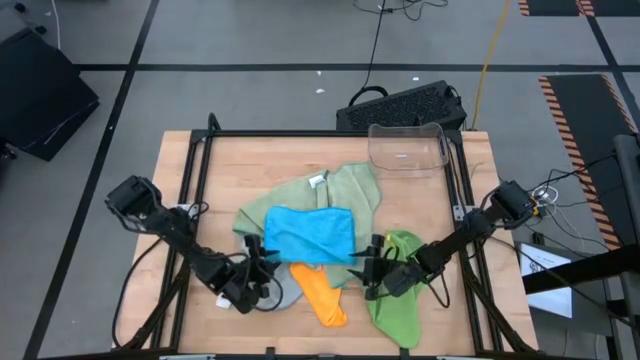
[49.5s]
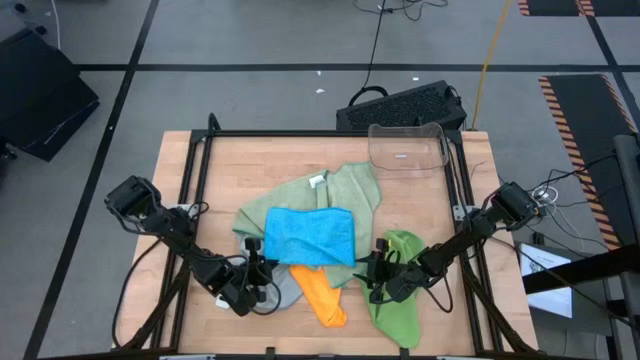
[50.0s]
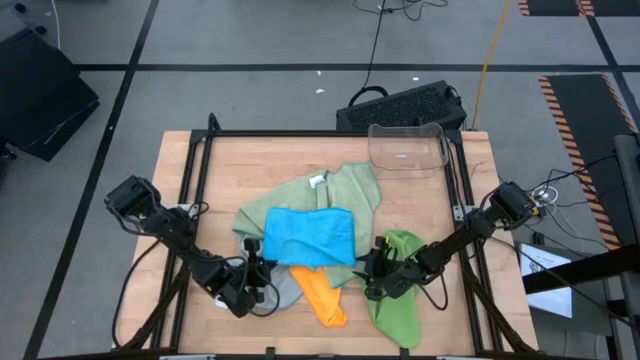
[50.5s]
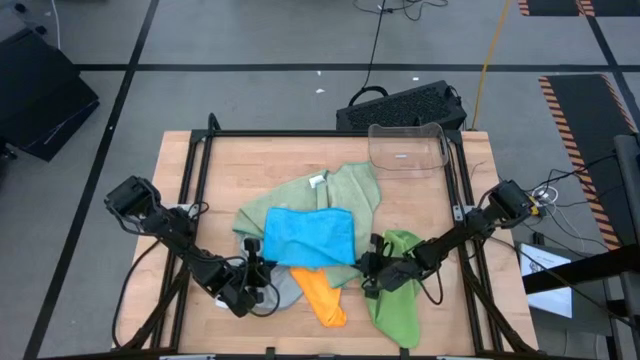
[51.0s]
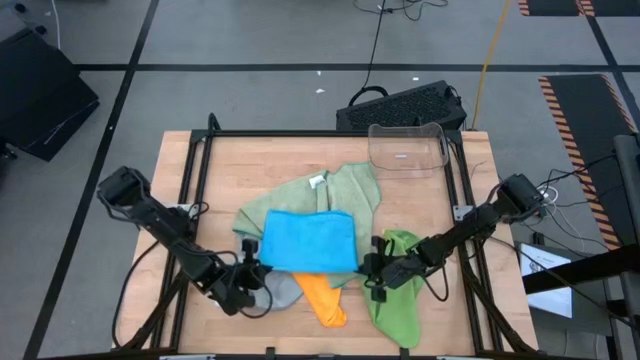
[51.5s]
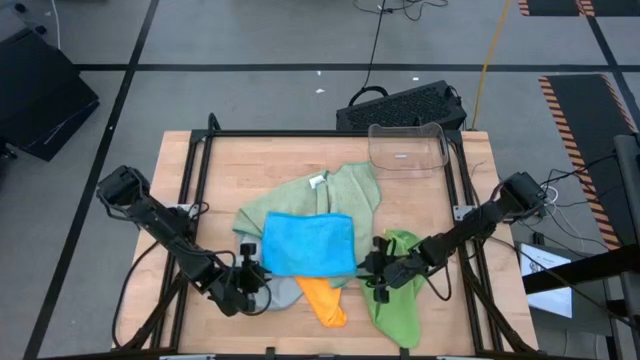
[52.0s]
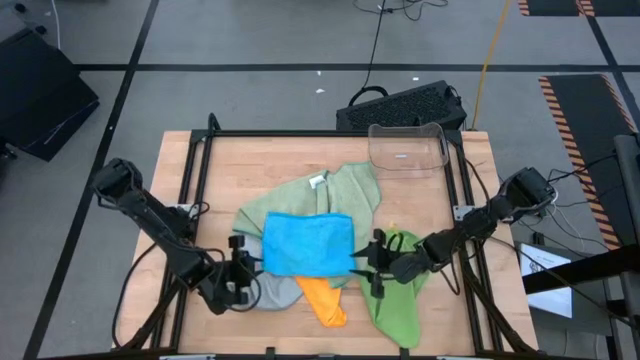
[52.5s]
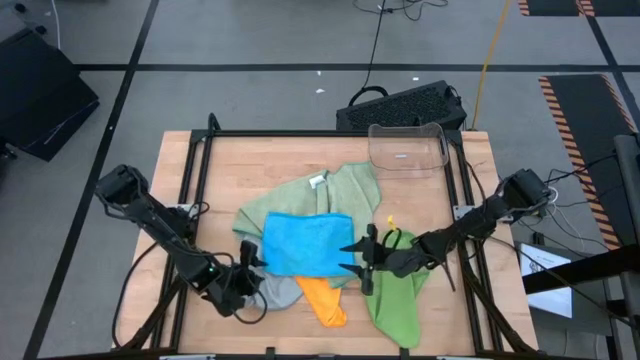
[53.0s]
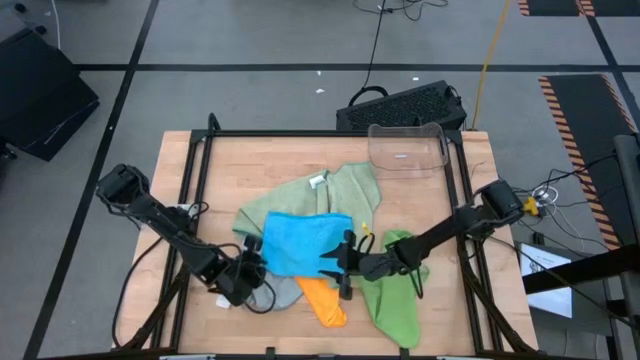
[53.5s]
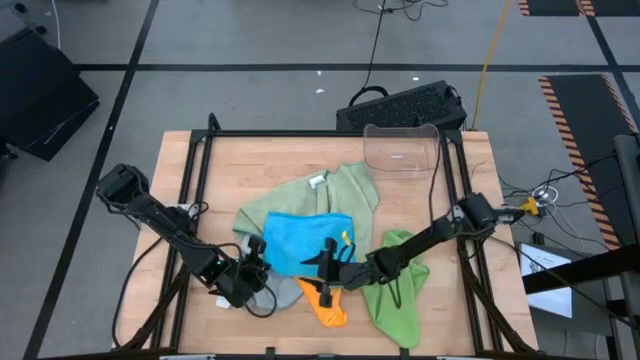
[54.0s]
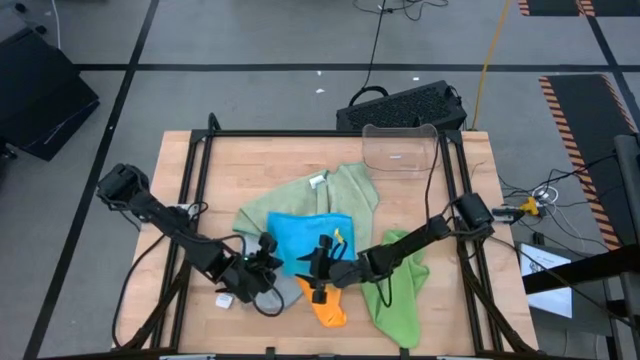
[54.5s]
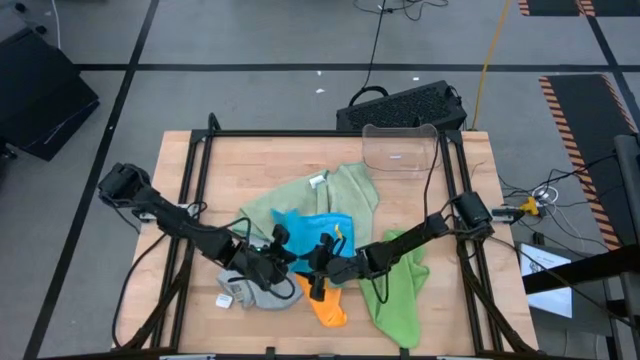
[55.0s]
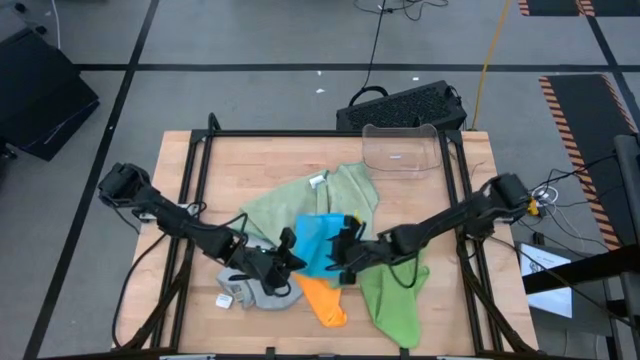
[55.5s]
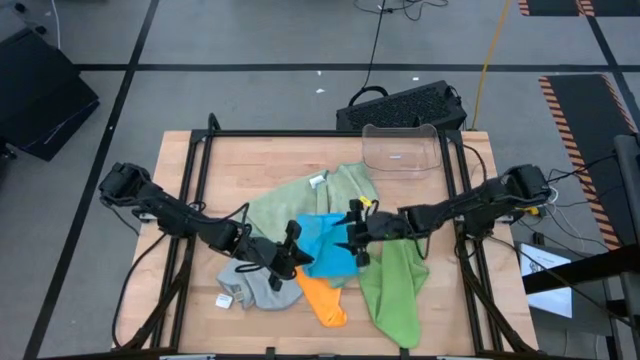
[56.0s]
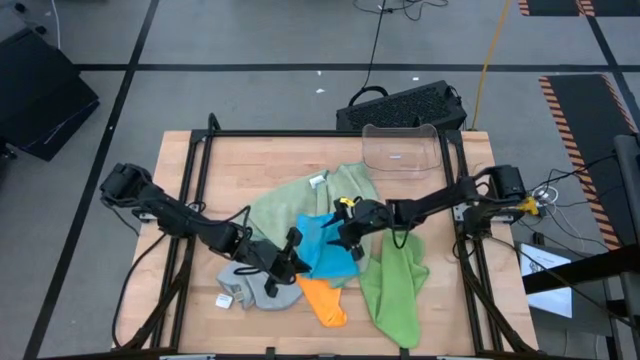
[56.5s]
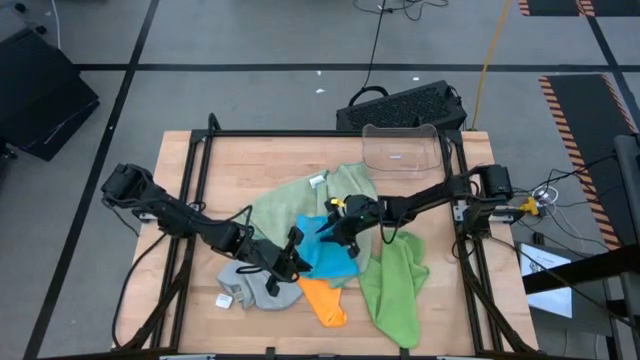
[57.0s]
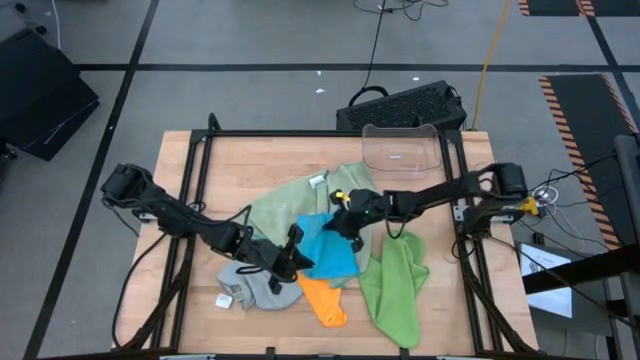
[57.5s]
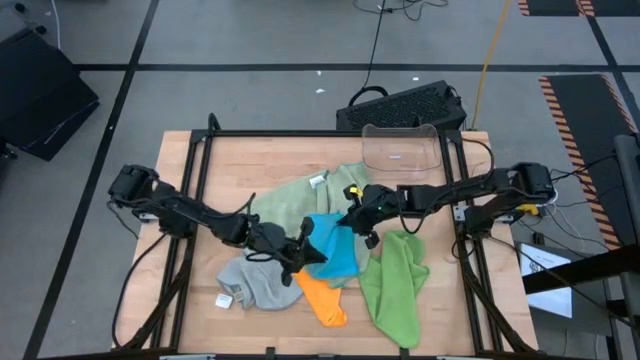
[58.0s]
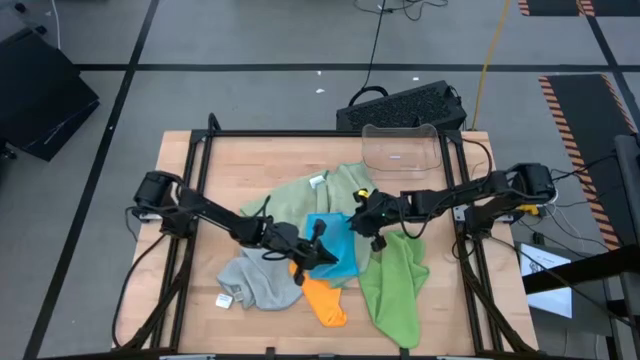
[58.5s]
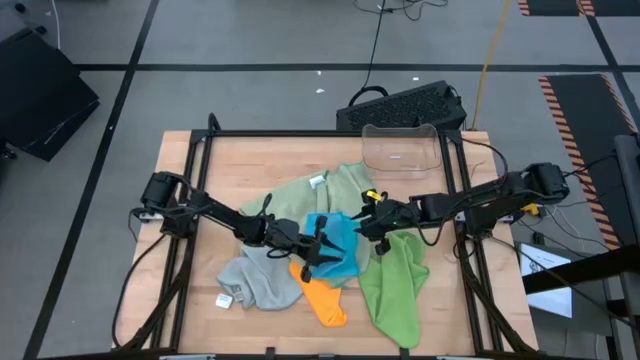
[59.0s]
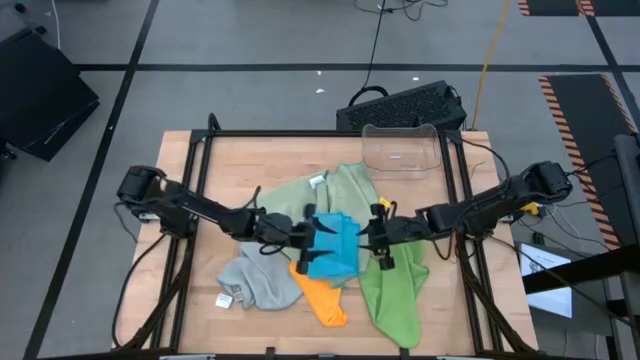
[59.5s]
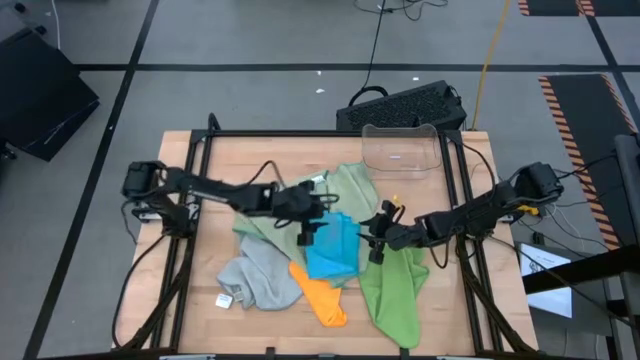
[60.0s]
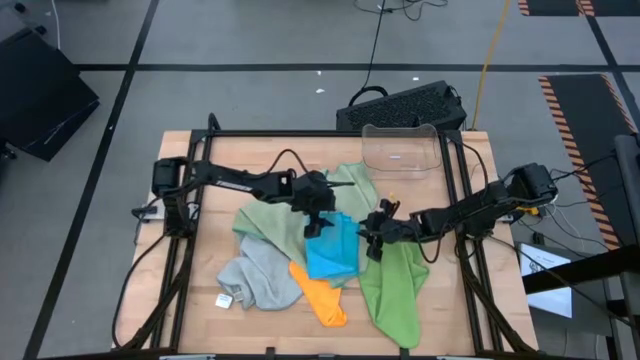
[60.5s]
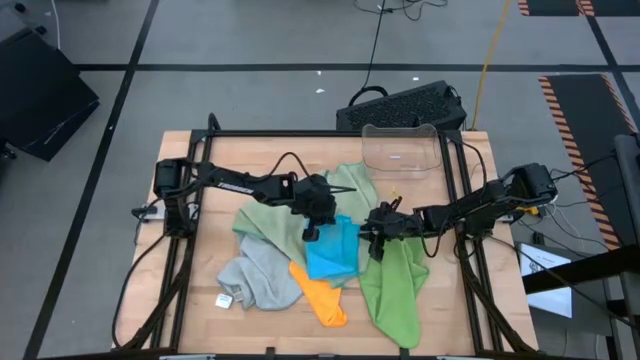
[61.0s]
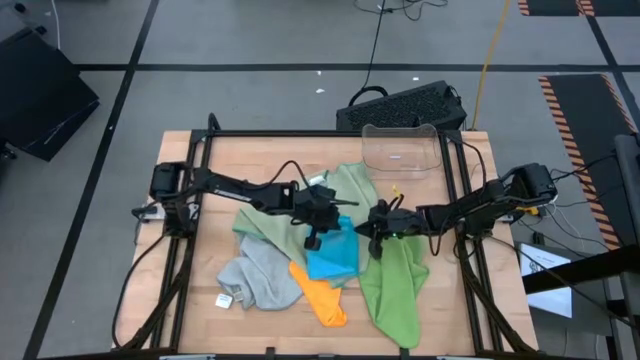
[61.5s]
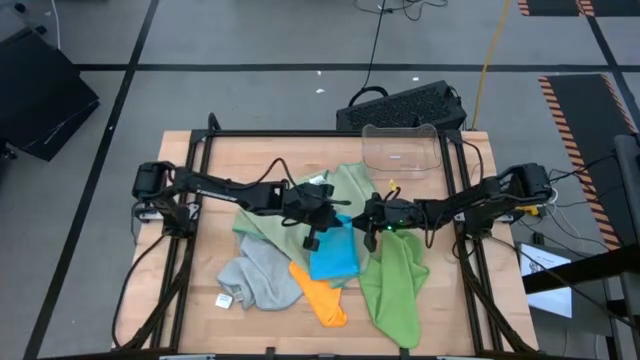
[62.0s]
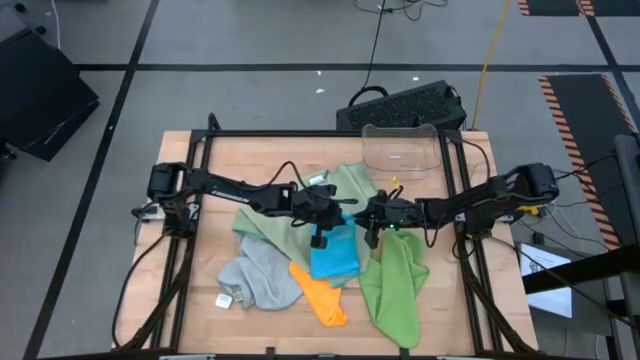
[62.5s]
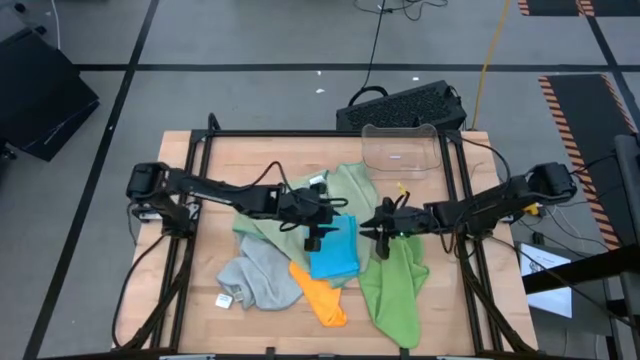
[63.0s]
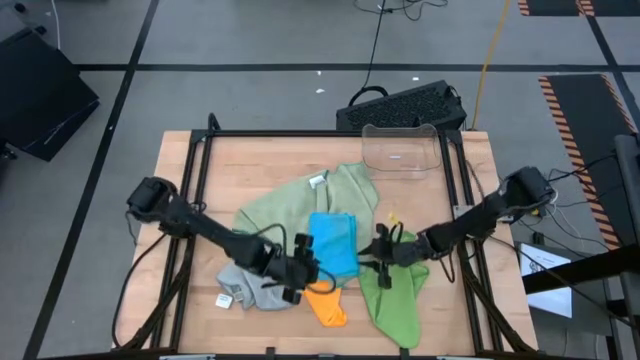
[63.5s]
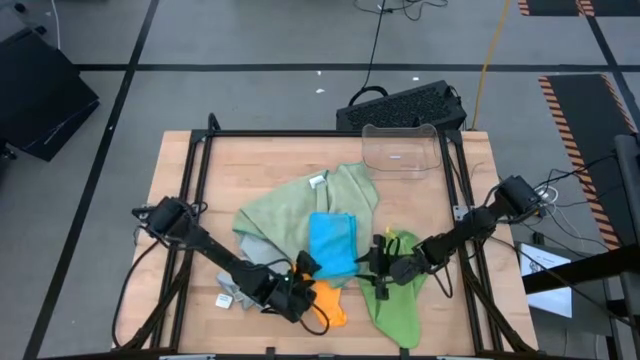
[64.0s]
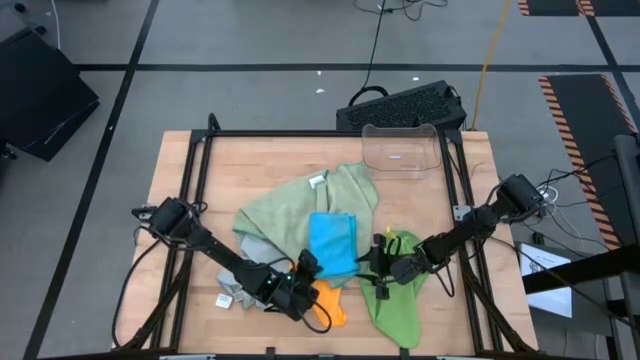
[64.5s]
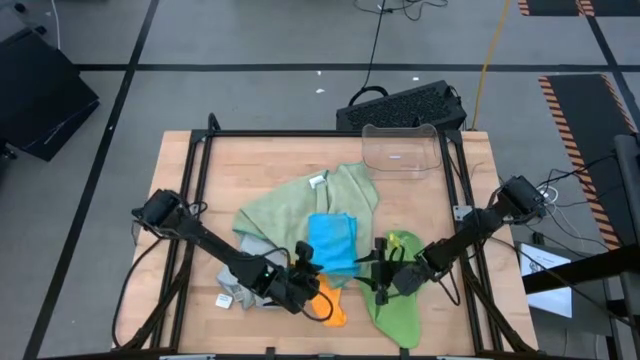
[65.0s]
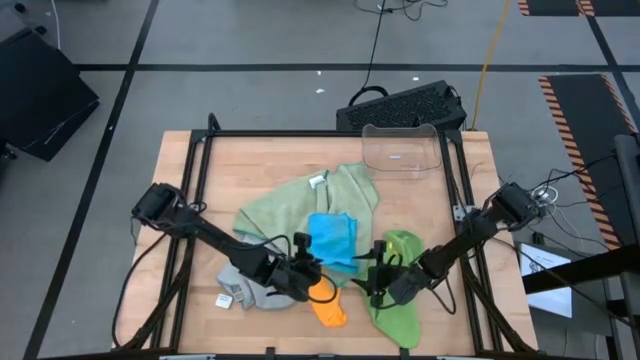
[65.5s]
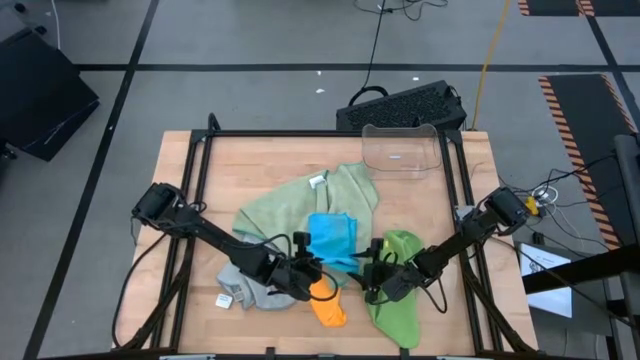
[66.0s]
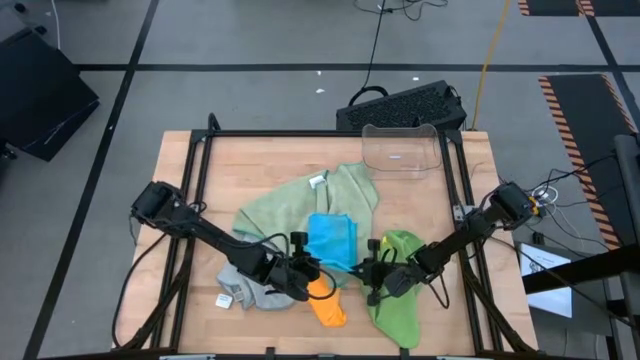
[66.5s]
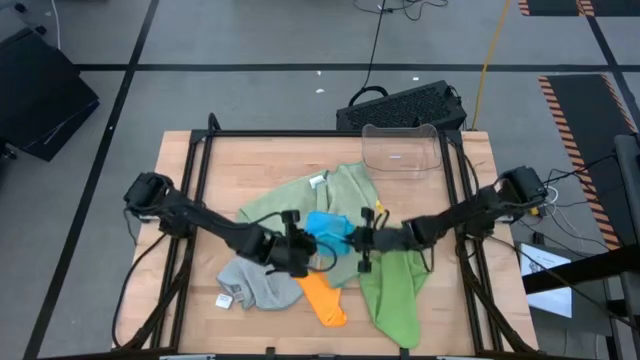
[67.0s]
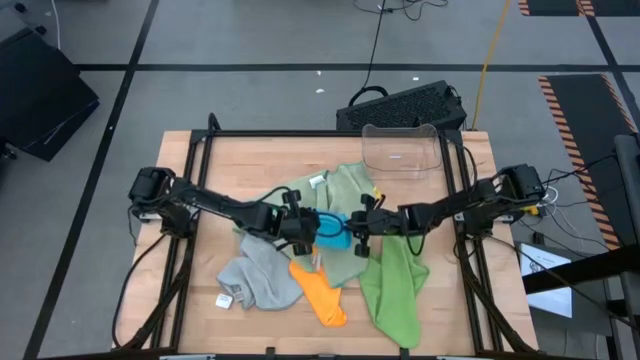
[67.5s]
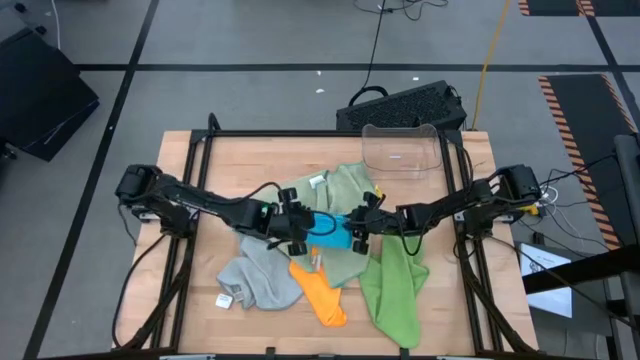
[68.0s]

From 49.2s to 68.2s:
Task: Fold microfiber towels
Fold the blue microfiber towel
